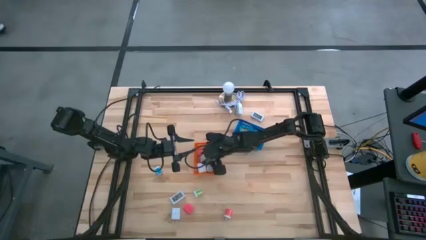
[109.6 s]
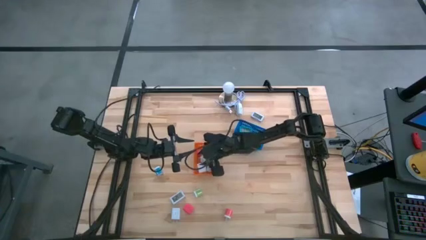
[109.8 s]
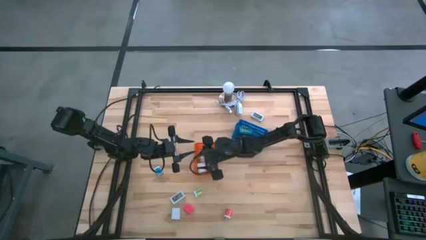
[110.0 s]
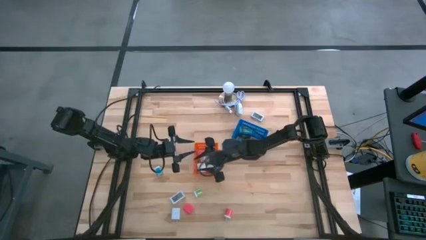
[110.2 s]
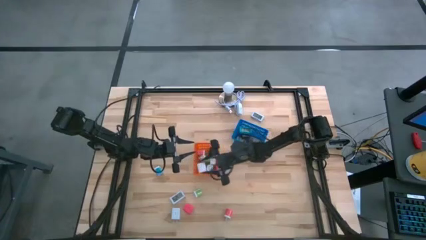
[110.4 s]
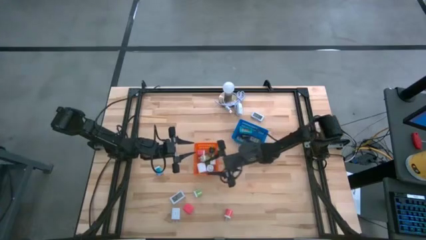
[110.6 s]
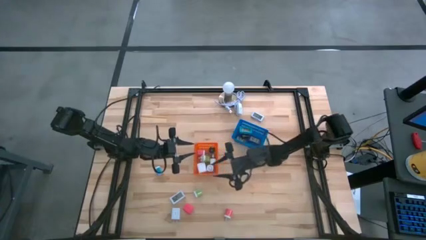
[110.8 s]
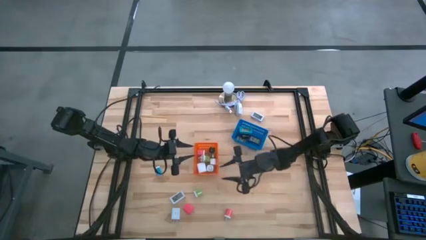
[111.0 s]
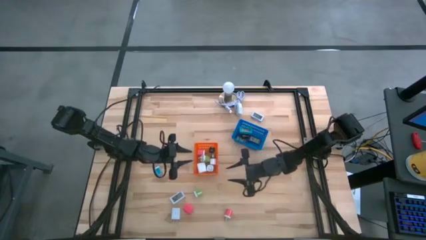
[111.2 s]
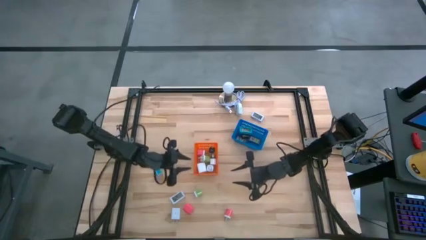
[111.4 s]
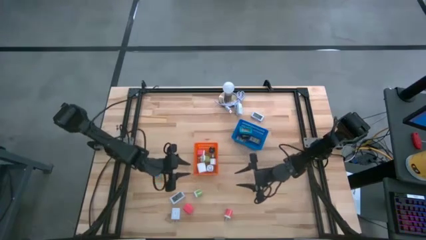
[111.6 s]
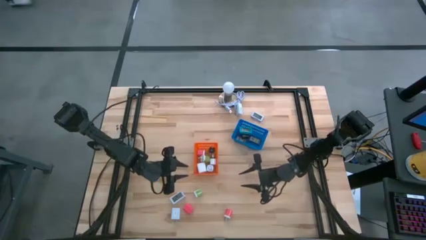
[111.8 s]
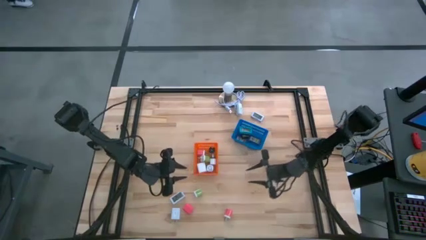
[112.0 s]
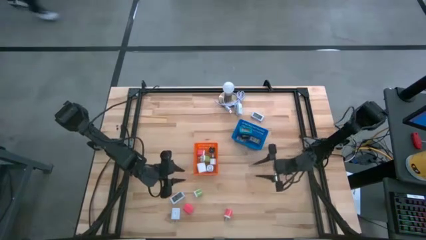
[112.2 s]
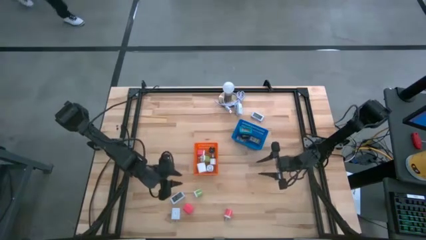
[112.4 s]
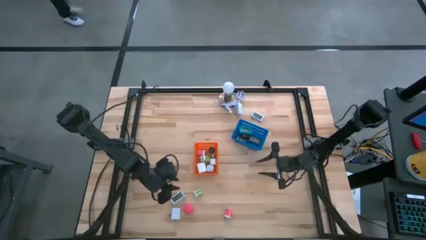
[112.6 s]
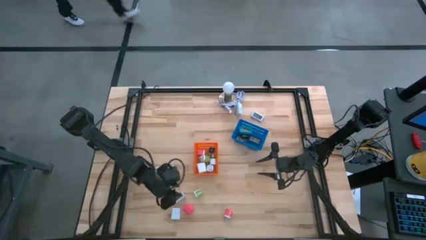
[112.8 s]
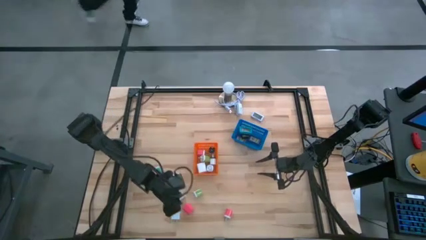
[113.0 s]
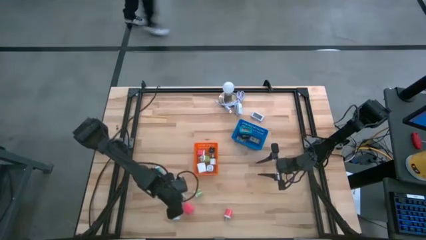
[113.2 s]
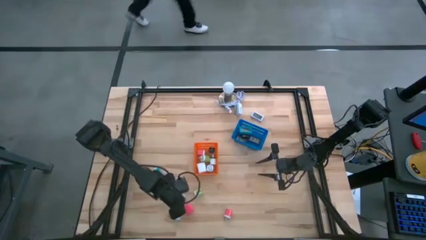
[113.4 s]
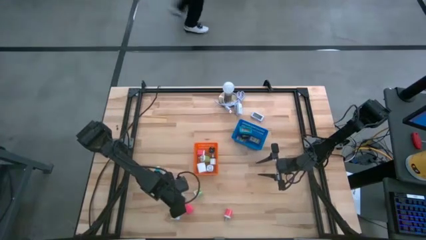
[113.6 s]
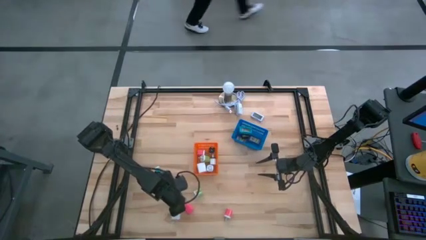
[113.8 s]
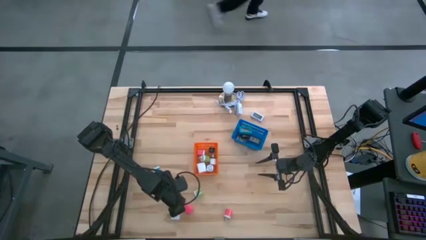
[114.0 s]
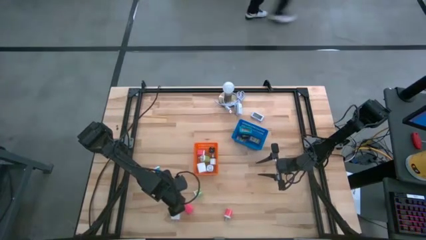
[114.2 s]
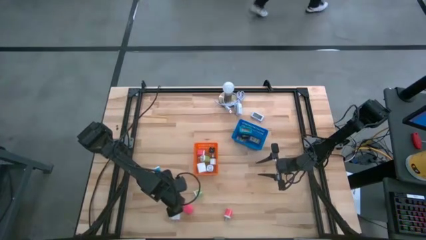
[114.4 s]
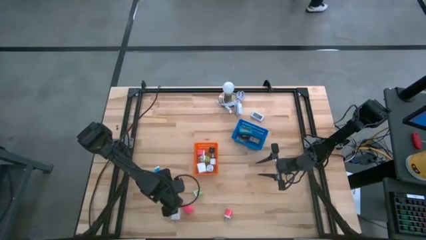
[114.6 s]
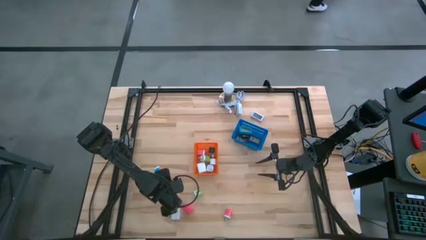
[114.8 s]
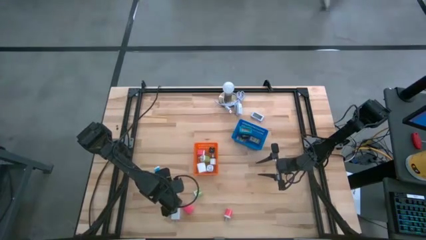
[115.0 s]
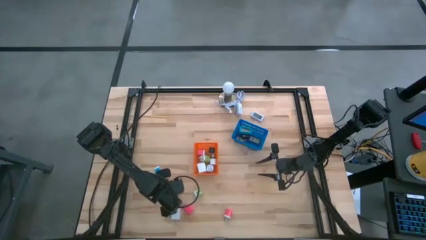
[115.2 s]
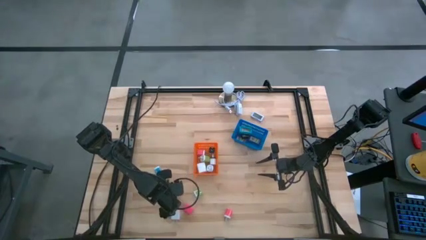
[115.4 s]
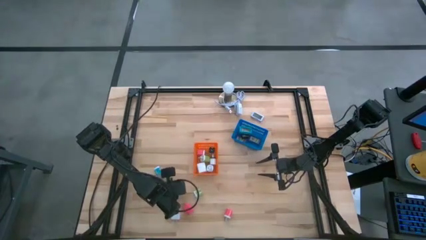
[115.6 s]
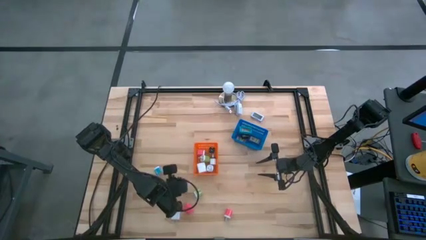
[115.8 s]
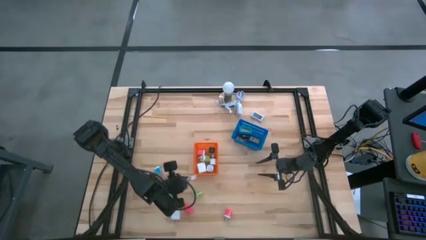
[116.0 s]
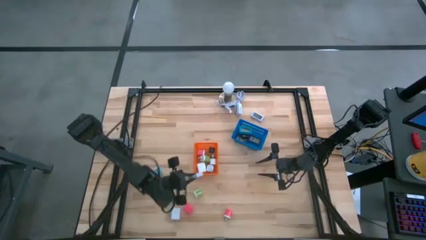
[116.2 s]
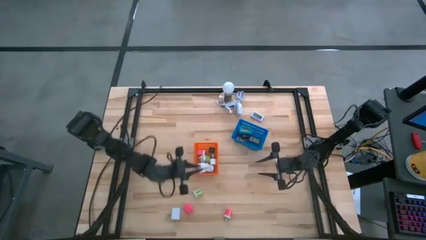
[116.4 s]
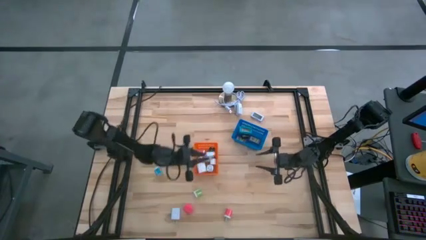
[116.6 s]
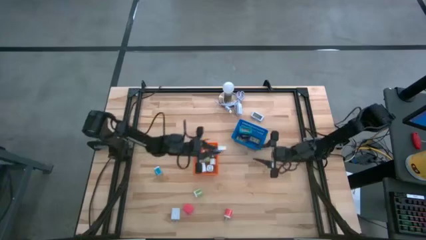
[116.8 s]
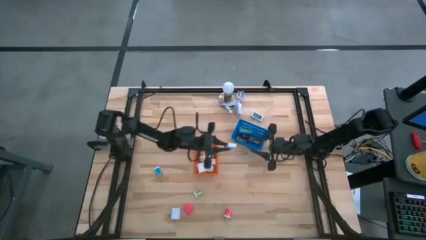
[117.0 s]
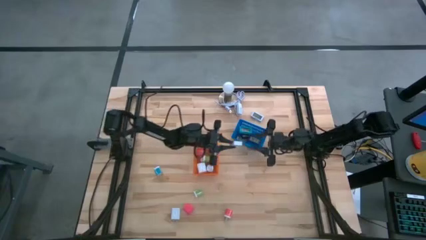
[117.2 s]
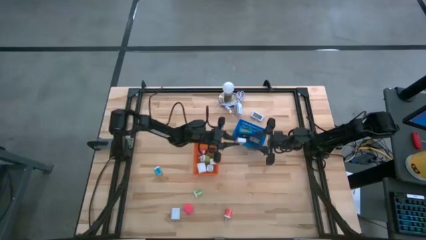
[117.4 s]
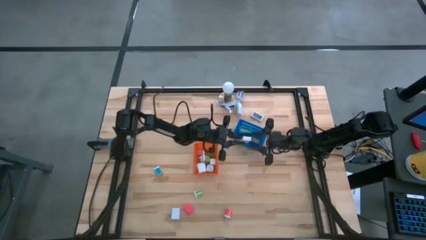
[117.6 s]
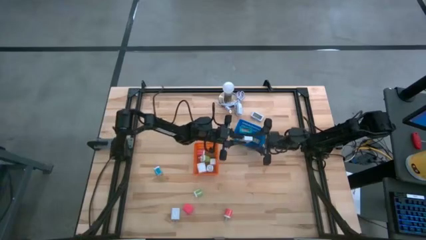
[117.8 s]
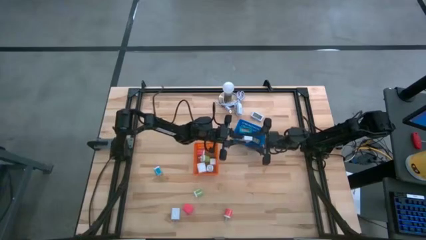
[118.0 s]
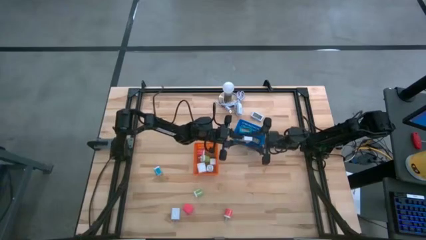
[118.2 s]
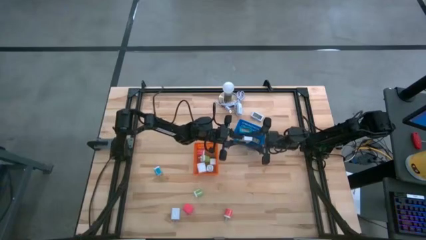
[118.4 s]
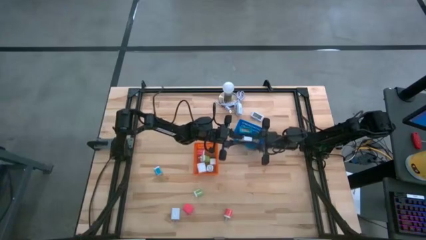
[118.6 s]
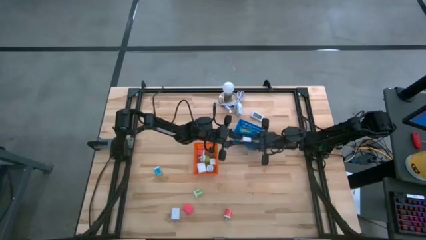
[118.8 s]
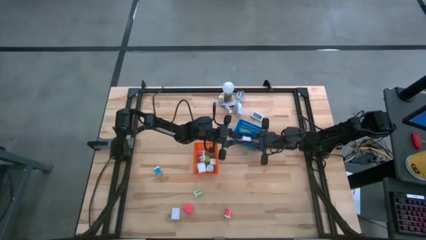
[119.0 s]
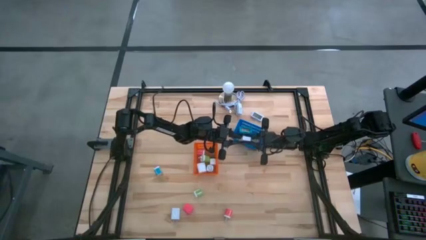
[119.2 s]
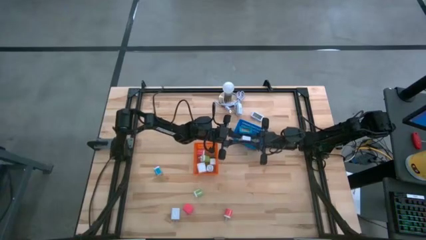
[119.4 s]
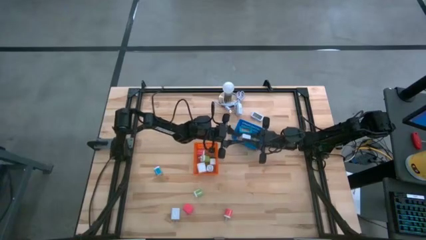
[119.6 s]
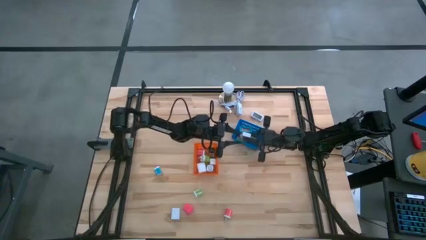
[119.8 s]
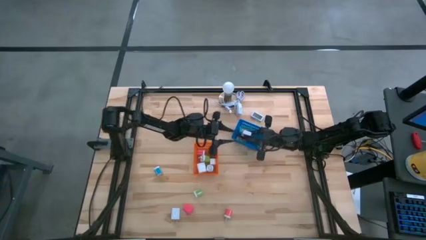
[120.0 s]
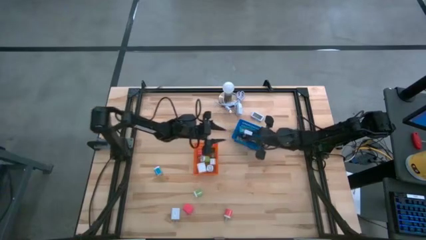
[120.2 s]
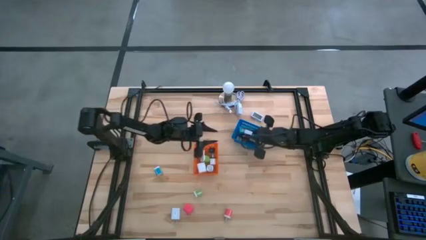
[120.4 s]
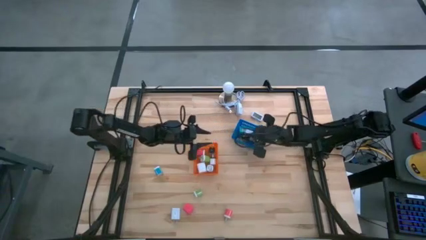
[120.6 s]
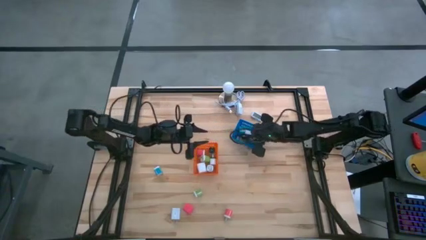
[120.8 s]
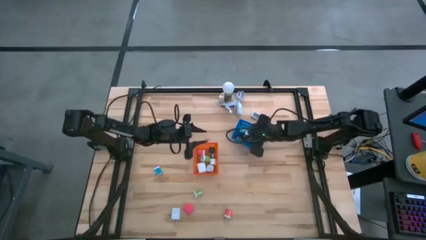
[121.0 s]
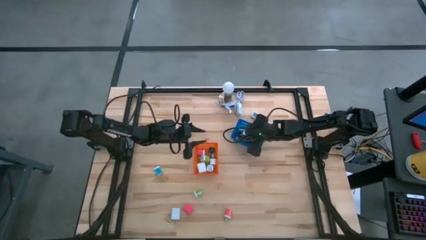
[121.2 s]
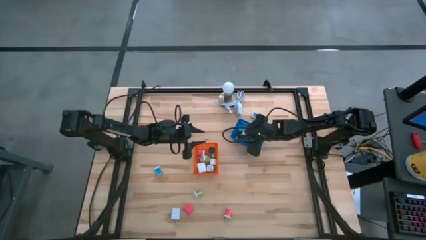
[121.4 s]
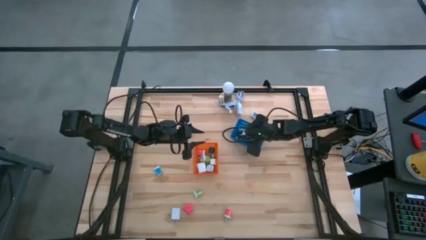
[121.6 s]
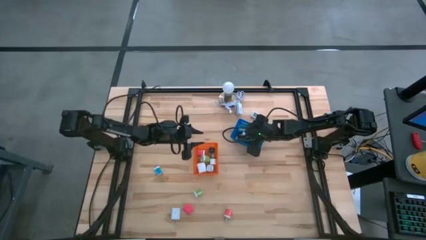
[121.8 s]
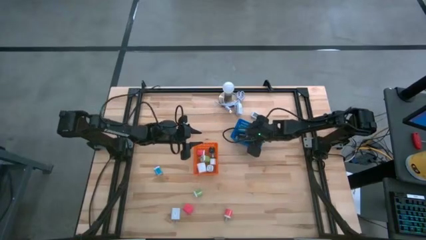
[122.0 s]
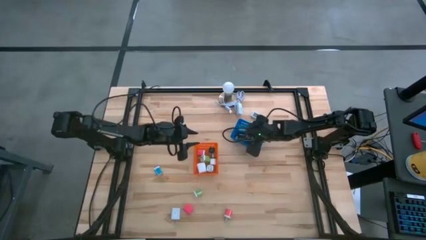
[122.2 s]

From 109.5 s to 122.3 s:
Task: Pick & Place Office items
Put the bottom white digital timer into the blue bin

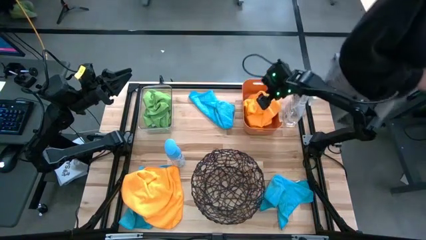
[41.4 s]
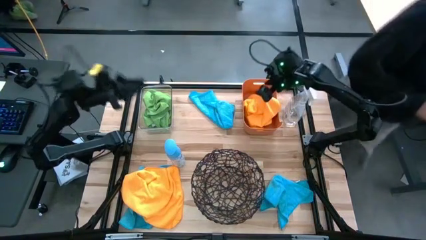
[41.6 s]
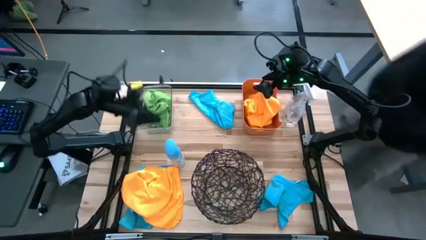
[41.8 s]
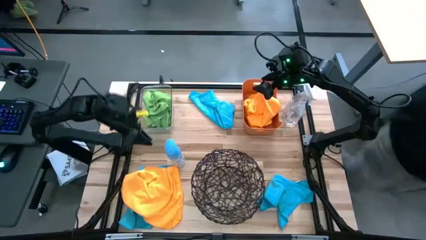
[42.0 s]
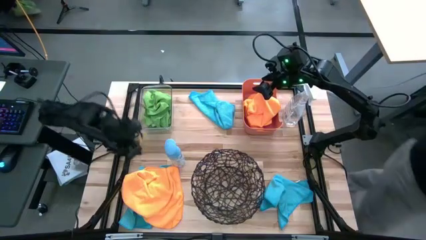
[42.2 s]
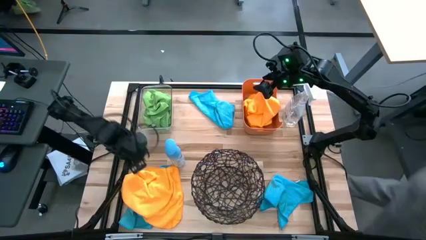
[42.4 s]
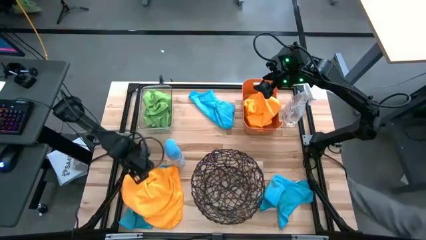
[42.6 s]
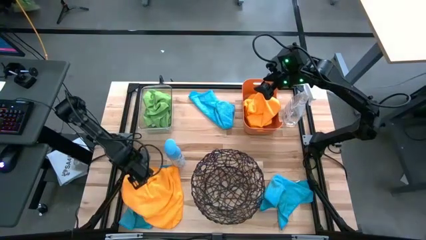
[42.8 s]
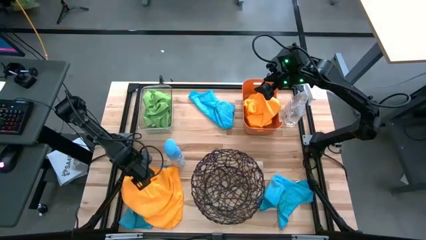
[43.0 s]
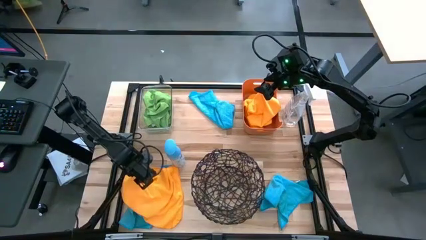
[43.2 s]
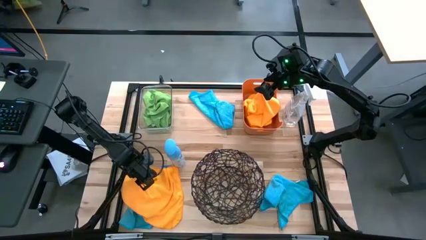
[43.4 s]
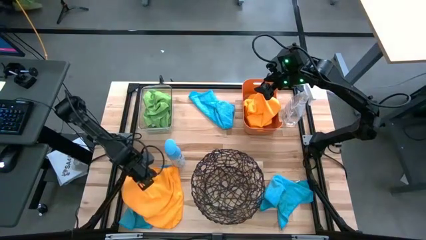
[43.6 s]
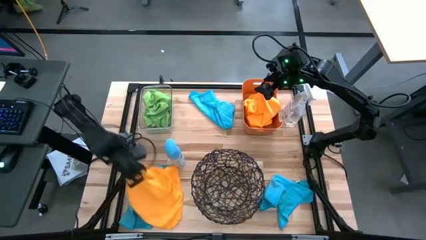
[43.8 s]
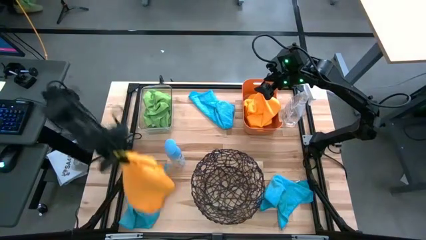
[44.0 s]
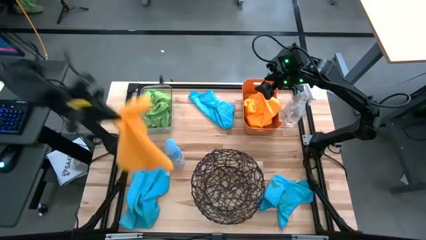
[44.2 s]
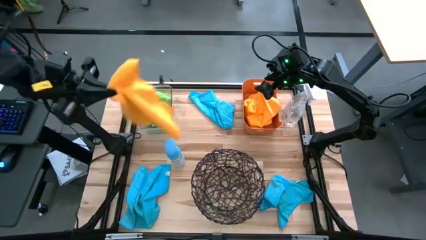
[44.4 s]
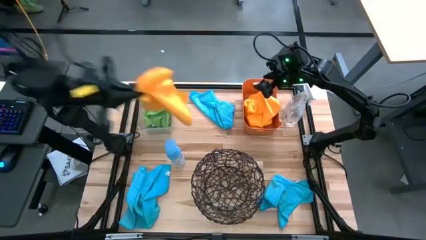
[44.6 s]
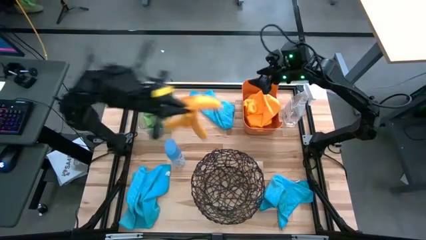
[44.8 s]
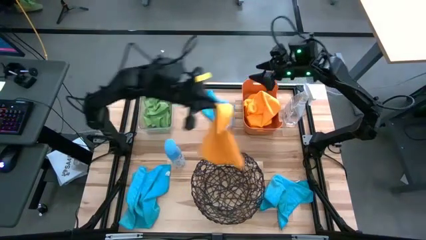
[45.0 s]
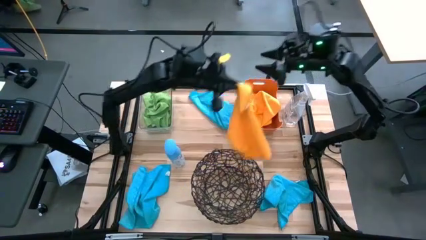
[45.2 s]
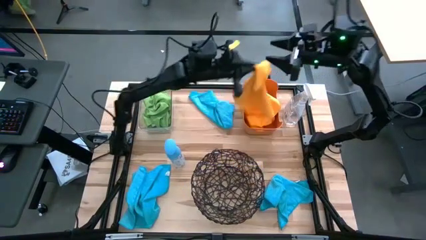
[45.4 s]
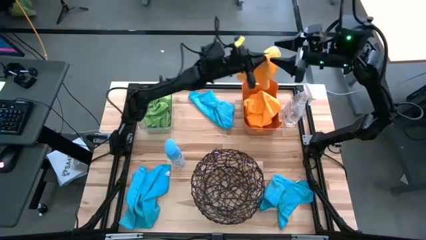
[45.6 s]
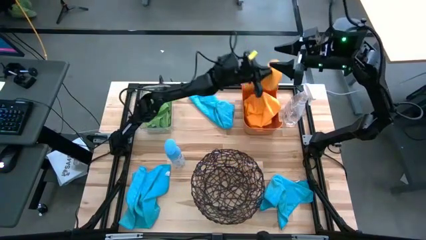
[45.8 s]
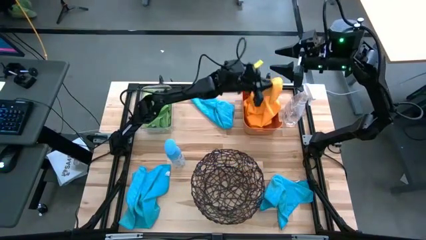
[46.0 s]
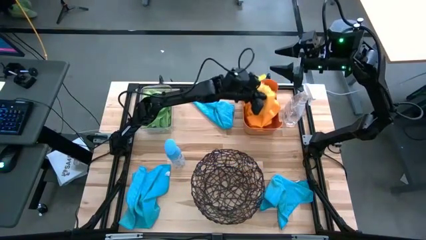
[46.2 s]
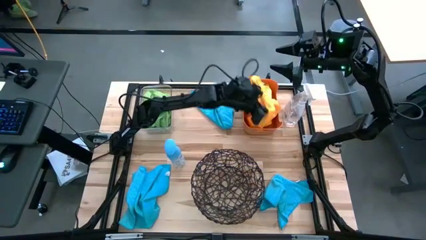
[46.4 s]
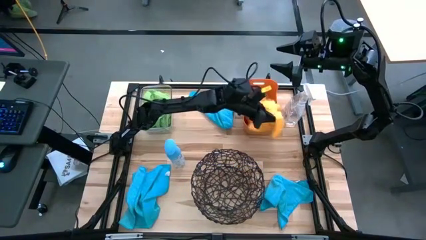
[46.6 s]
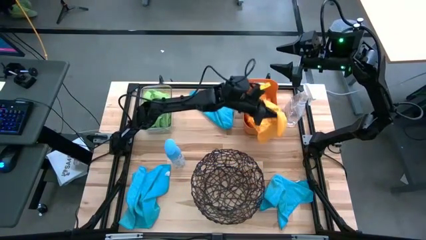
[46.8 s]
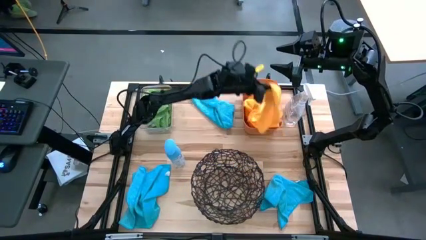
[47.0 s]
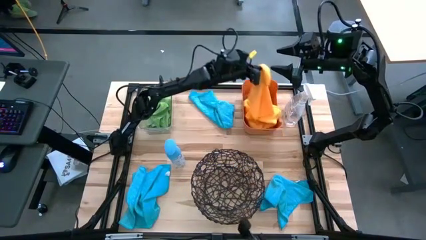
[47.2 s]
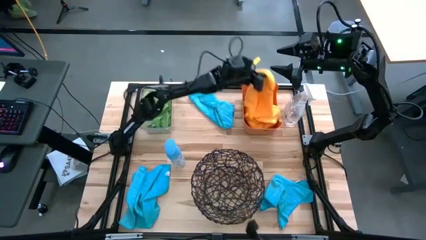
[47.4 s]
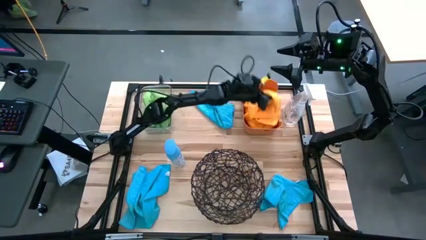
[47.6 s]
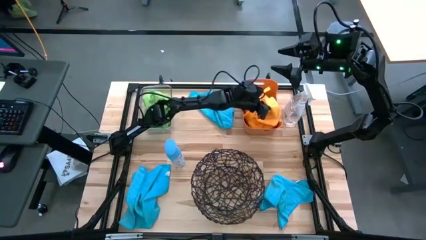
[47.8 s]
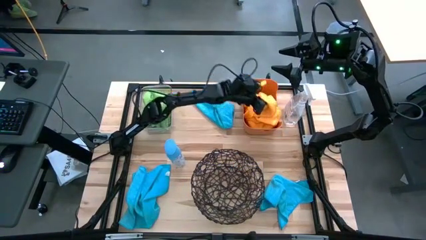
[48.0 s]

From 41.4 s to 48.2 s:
Task: Sort microfiber towel by color & place in baskets
Put the orange microfiber cloth into the orange bin
